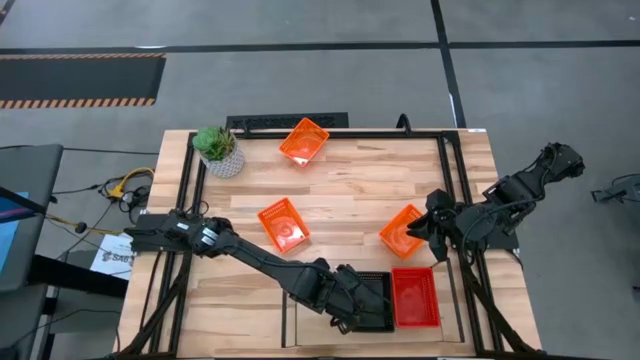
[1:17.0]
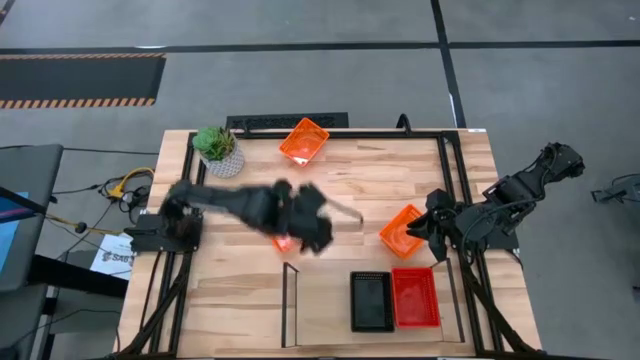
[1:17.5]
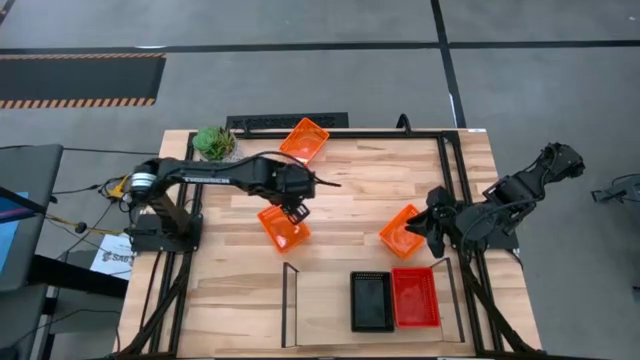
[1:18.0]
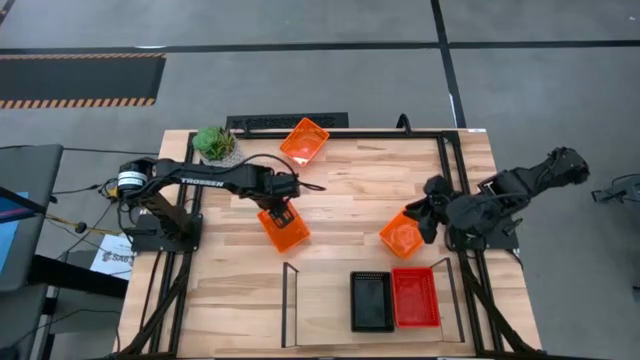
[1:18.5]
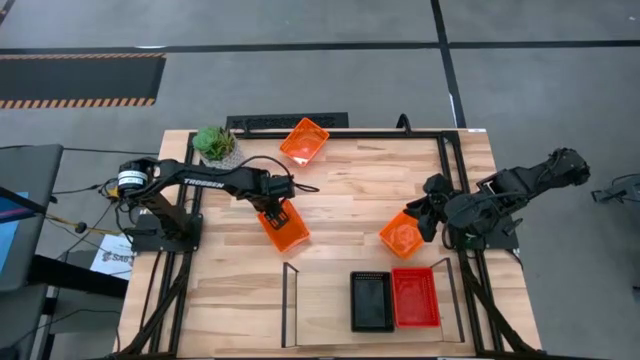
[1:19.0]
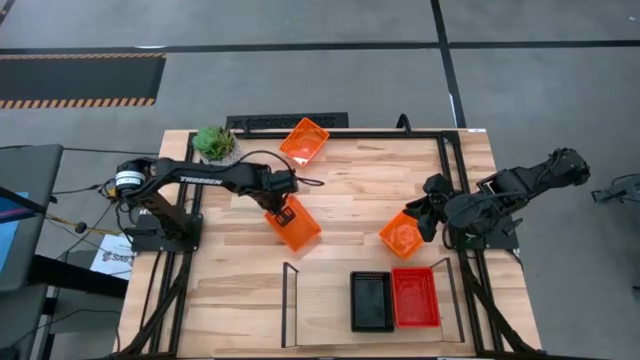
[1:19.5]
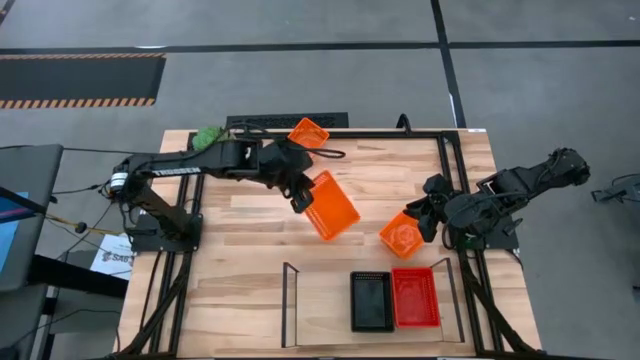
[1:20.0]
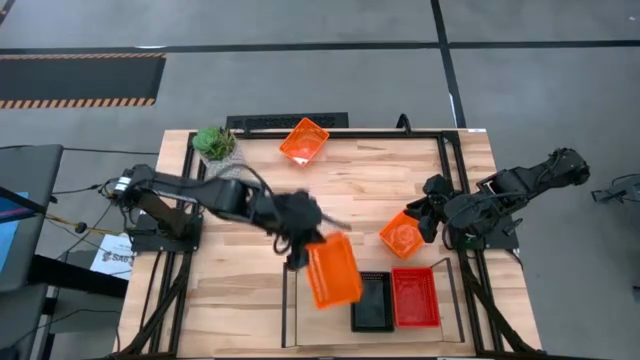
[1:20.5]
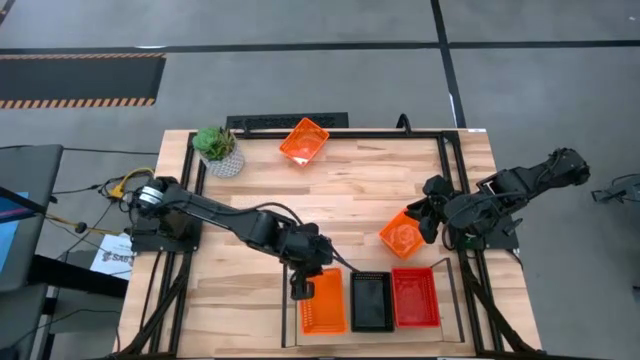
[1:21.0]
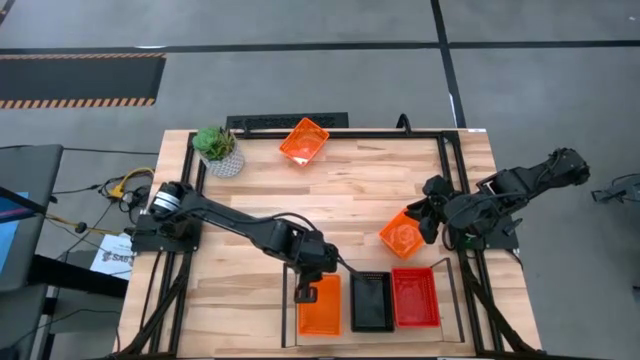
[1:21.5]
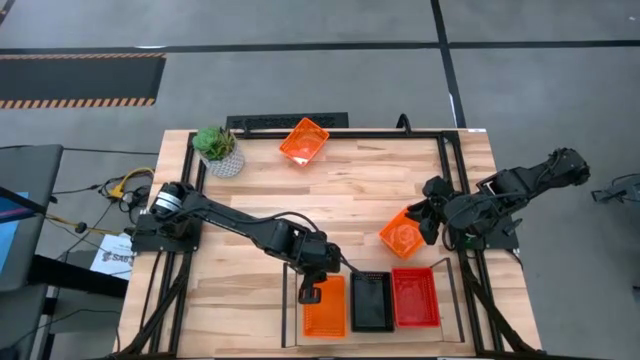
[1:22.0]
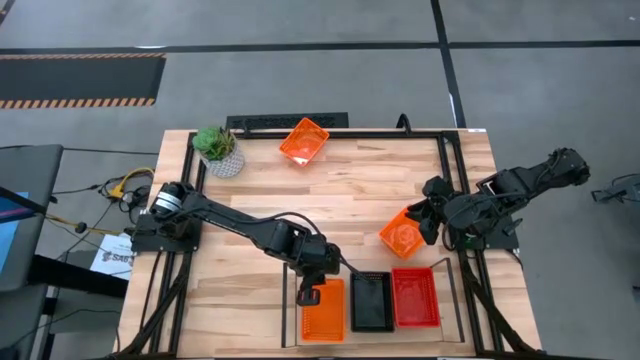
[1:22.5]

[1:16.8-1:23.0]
Task: Stack baskets on shelf by color
Put the bottom left orange bin on the shelf

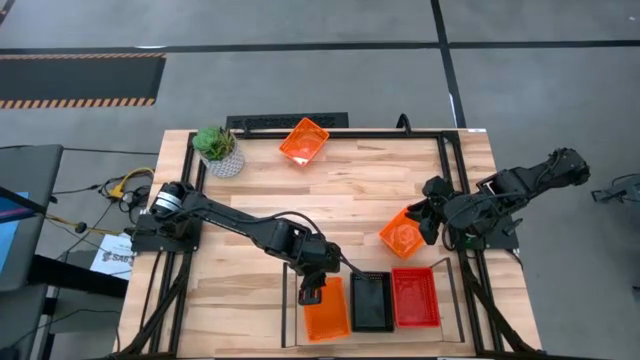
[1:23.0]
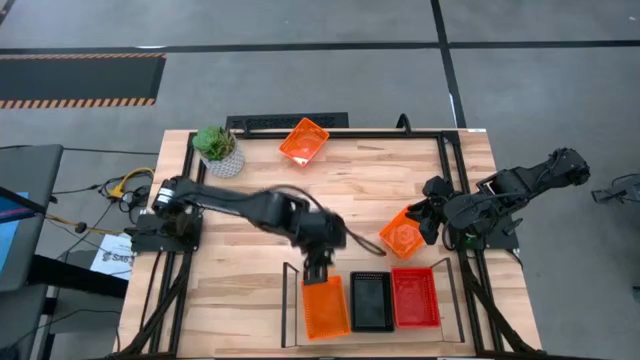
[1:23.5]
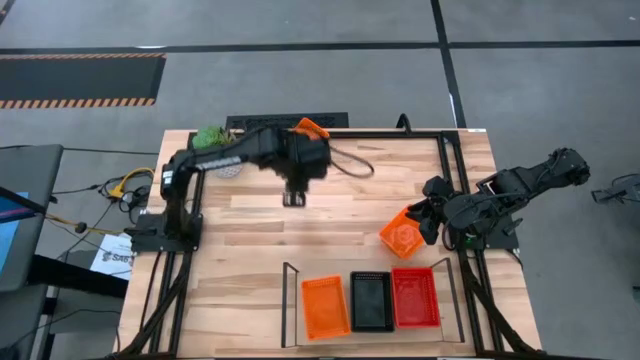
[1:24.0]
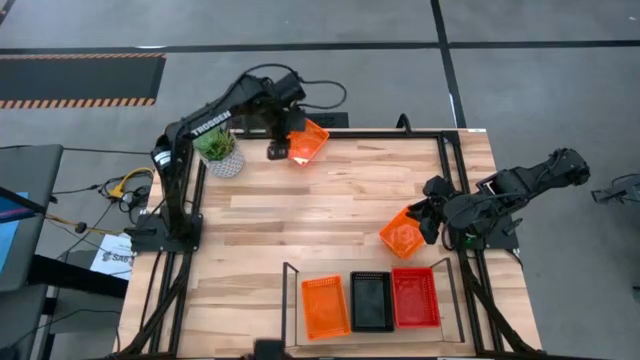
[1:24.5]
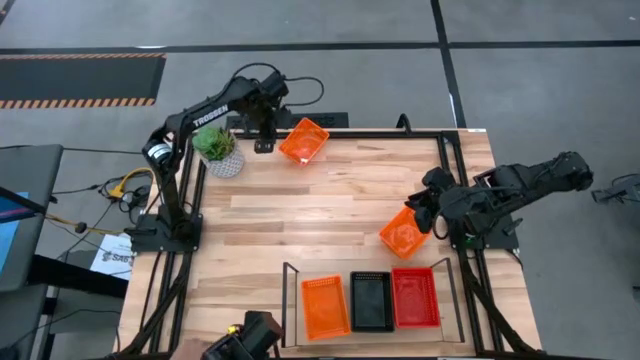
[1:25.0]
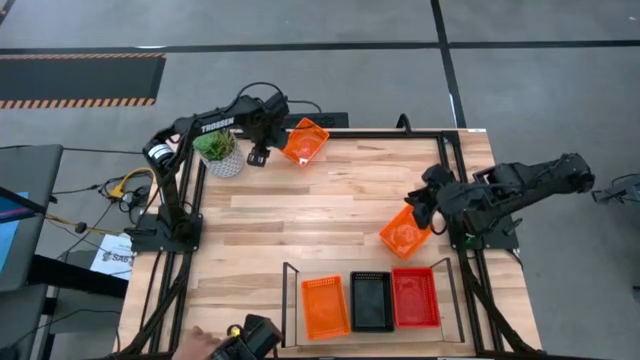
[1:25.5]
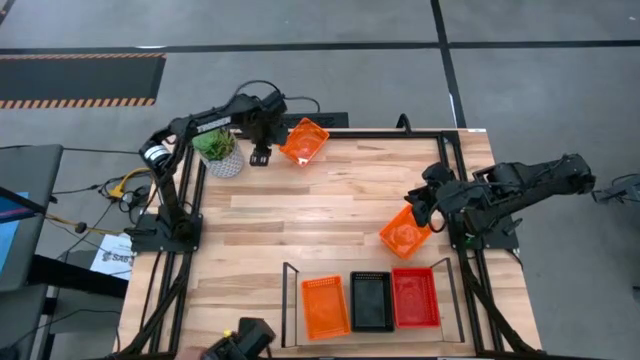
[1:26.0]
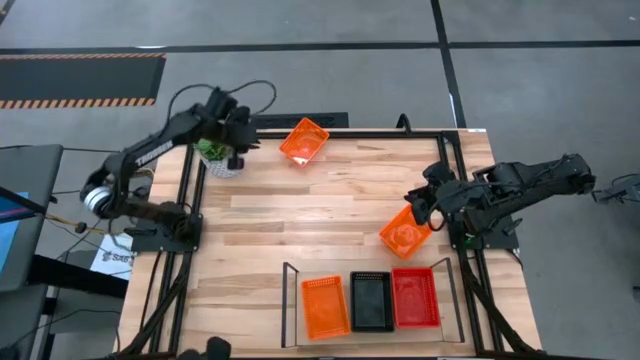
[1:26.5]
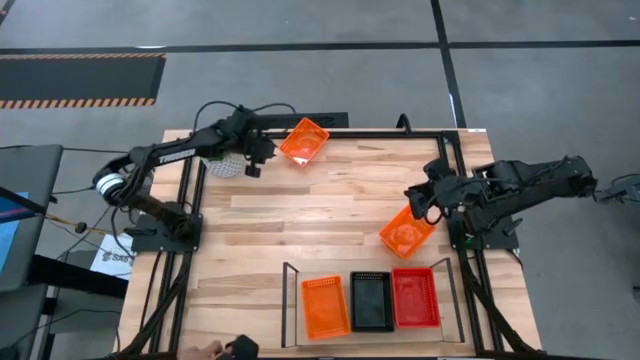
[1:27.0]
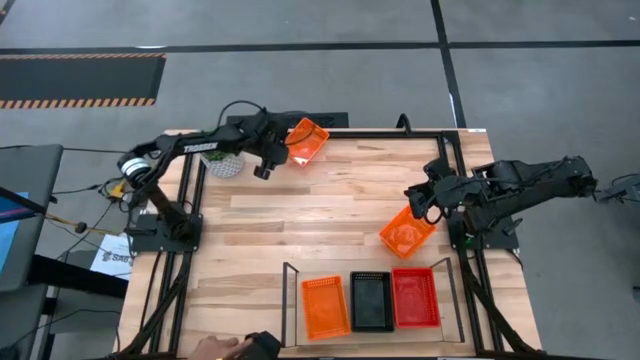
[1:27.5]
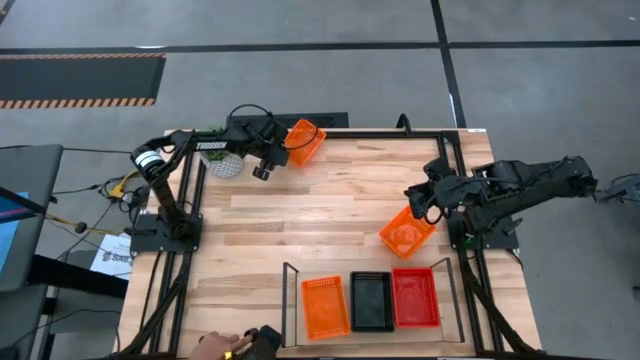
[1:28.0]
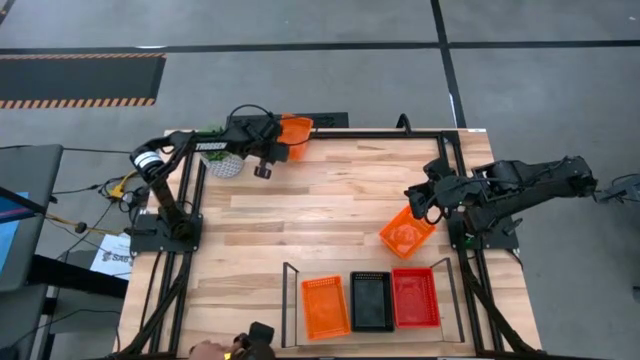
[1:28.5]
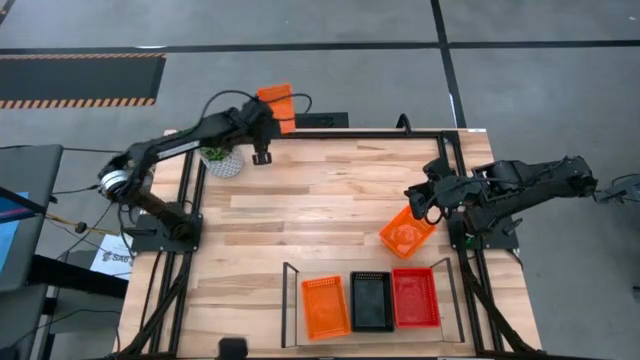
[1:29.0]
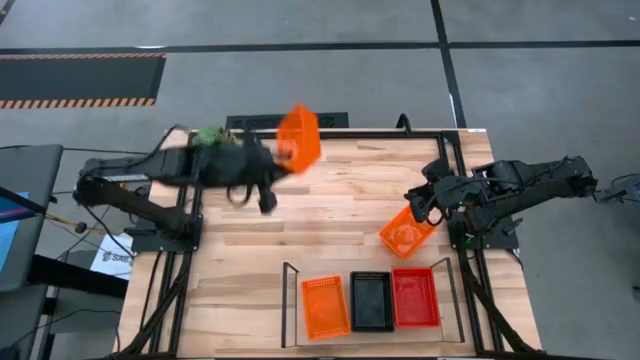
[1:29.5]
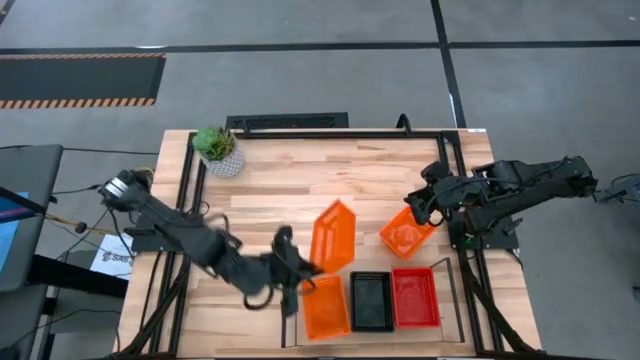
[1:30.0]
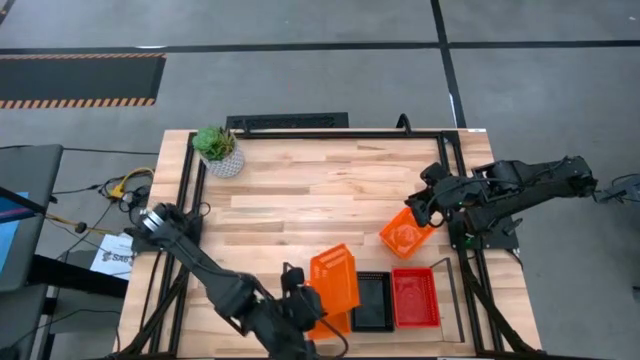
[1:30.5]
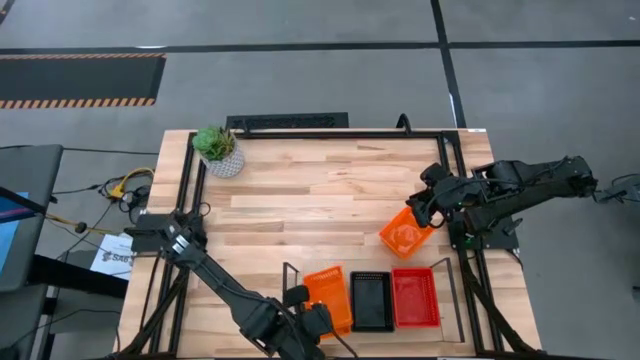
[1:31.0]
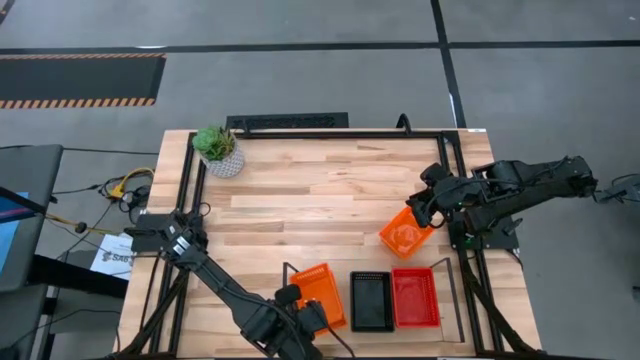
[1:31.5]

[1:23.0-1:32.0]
Stack the top orange bin on top of the orange bin on the shelf

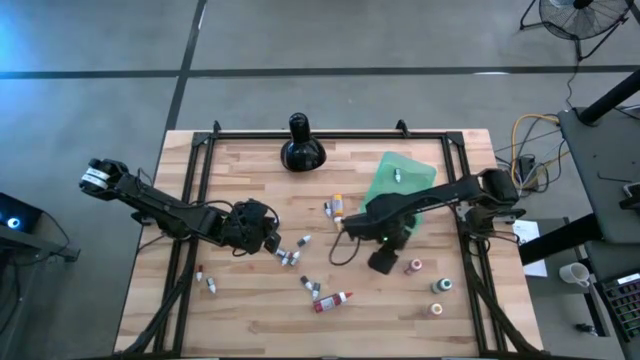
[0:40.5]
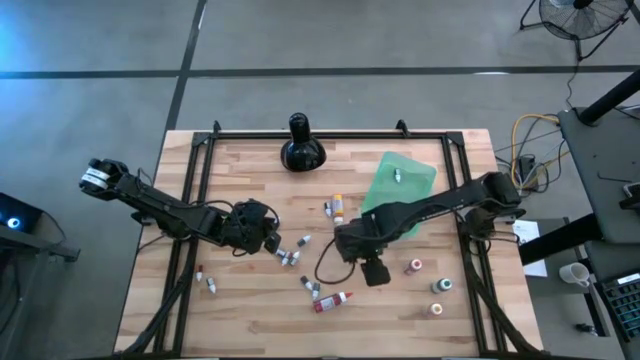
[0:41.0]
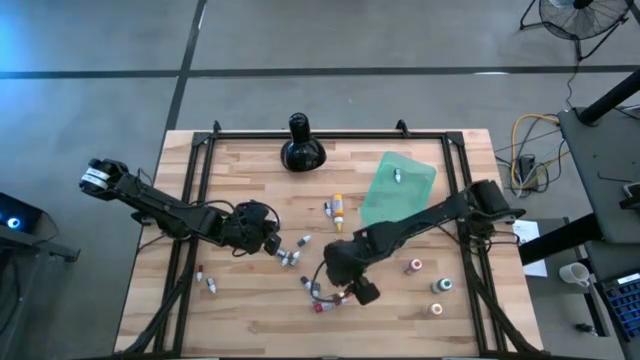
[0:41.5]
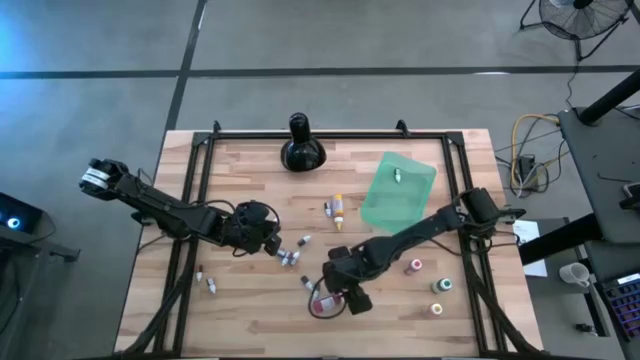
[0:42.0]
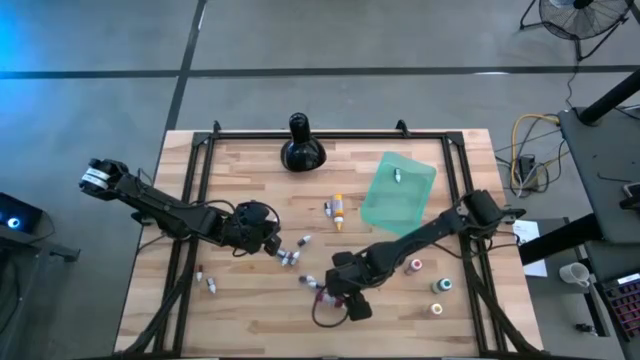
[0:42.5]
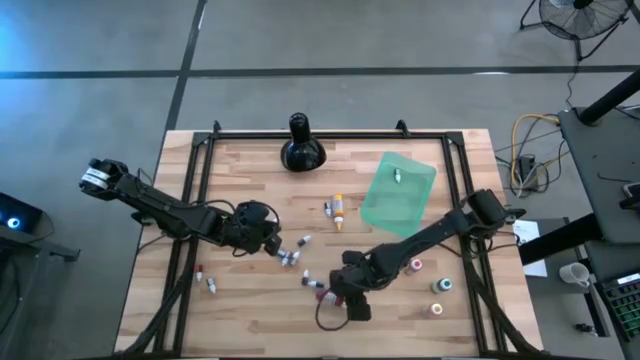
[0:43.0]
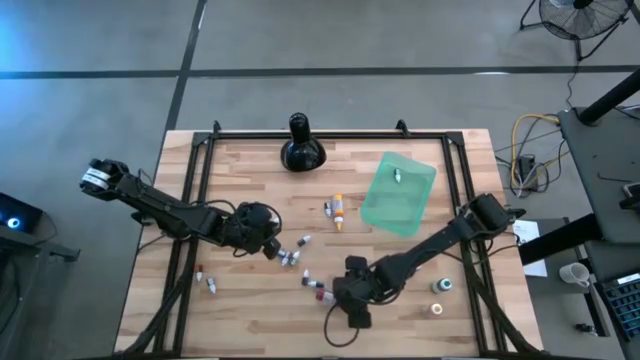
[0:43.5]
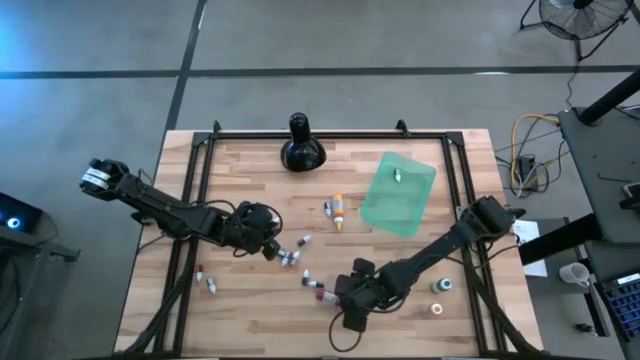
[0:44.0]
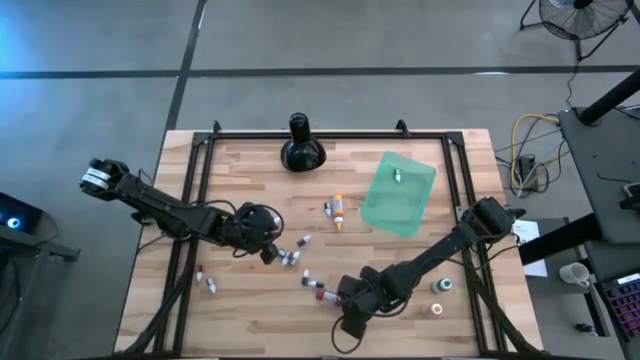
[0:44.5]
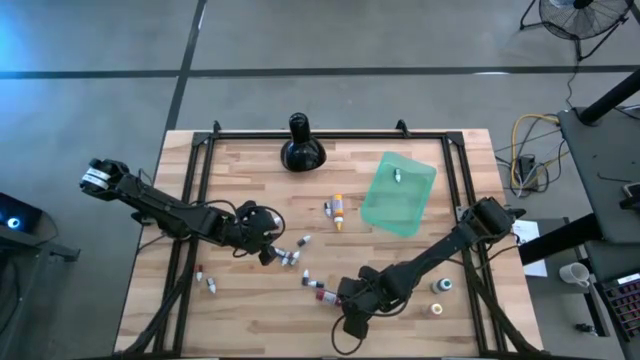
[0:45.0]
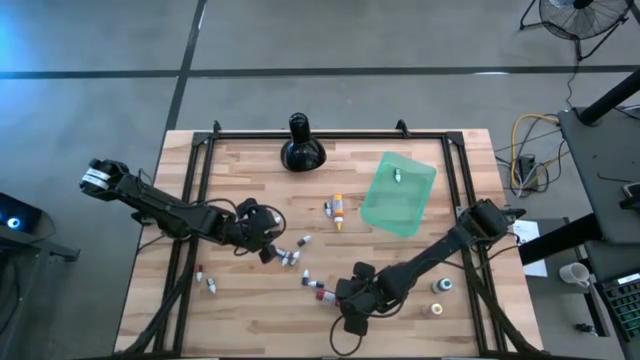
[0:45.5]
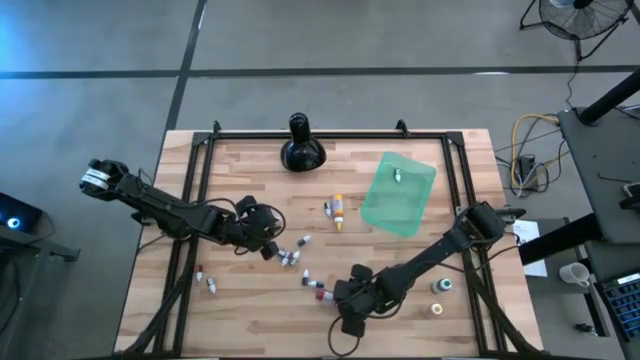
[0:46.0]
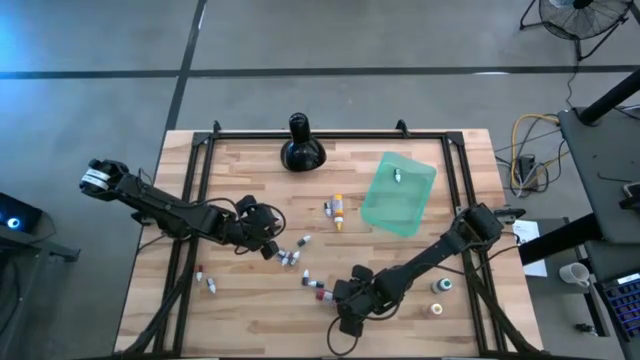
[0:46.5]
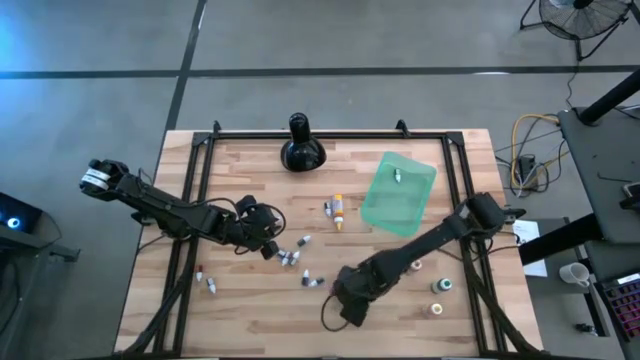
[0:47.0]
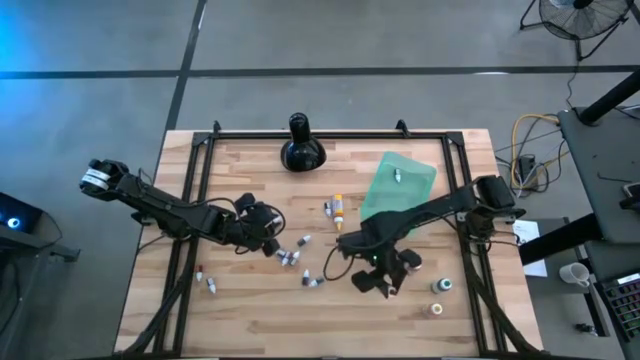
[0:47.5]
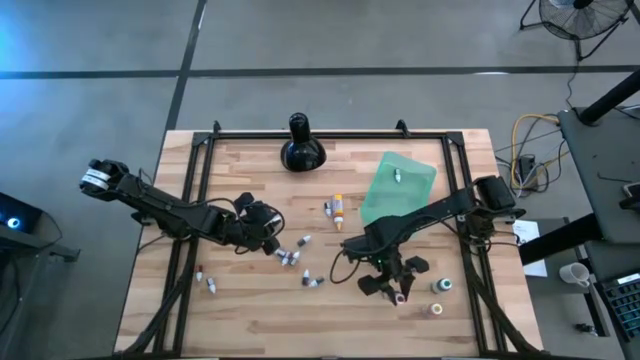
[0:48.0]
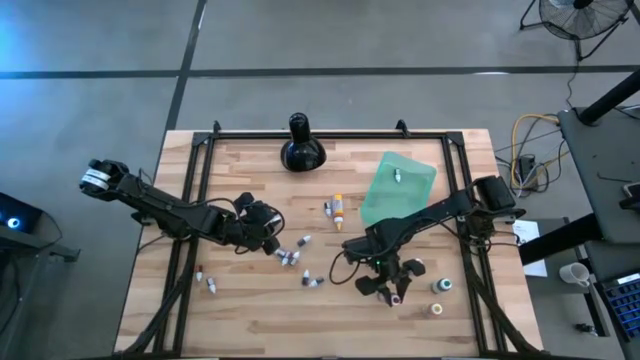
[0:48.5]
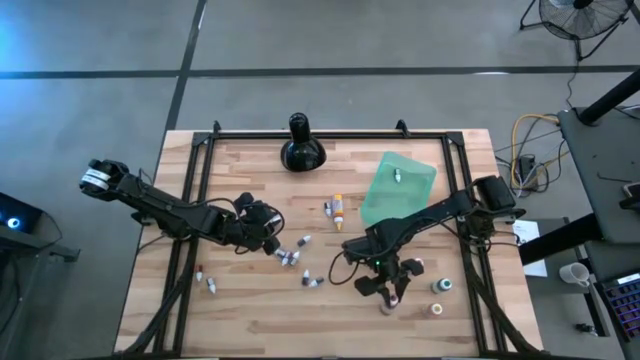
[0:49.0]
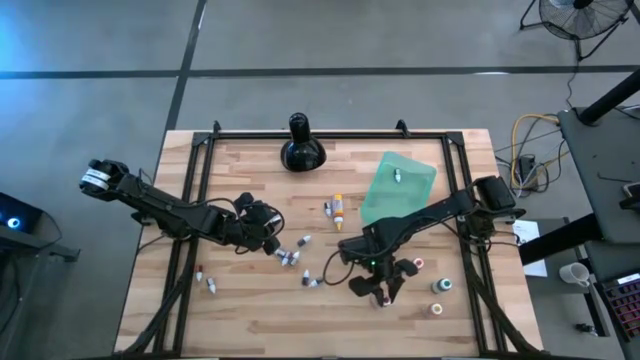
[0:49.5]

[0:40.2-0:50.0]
Task: Pick & Place food coloring
Adjust the large red food coloring bottle in the table
